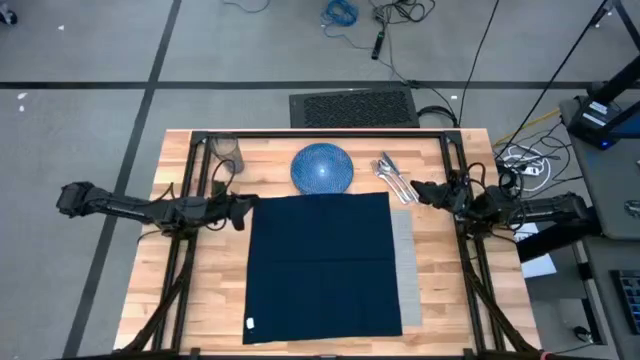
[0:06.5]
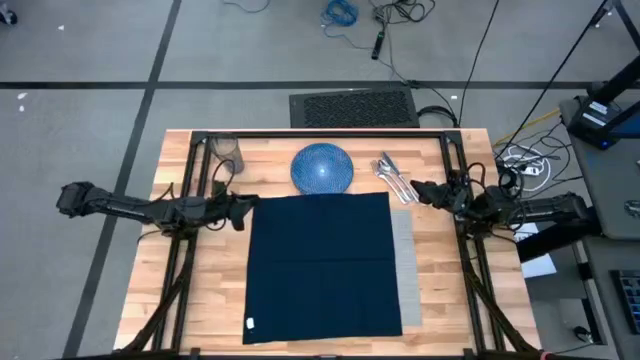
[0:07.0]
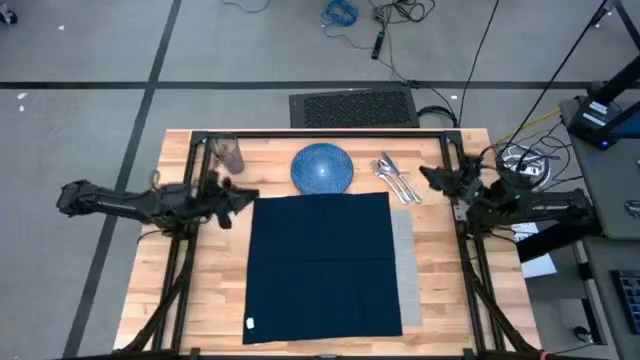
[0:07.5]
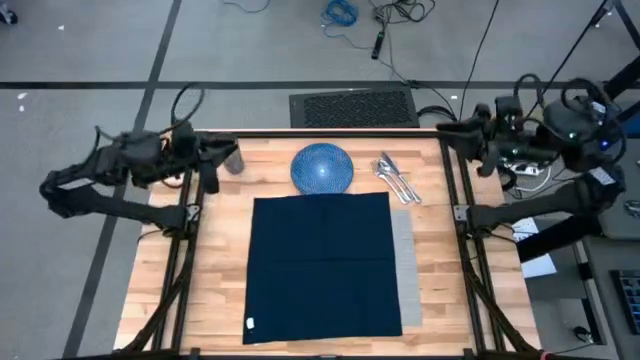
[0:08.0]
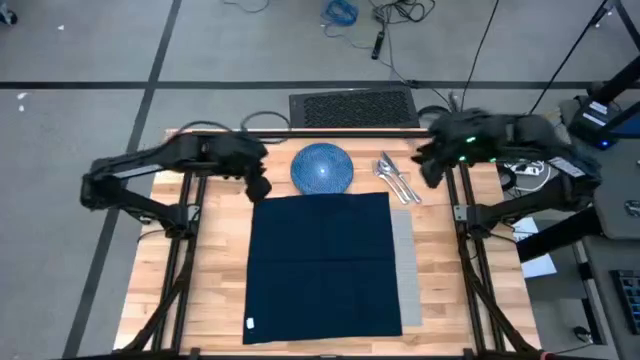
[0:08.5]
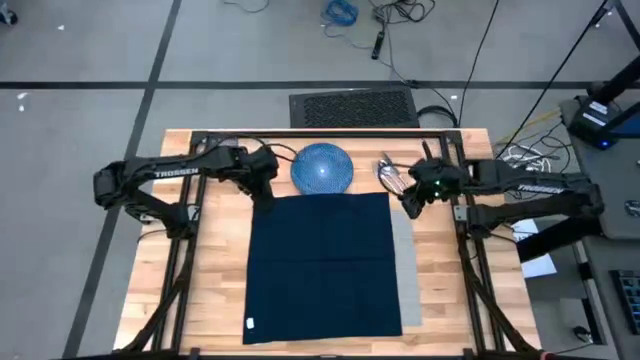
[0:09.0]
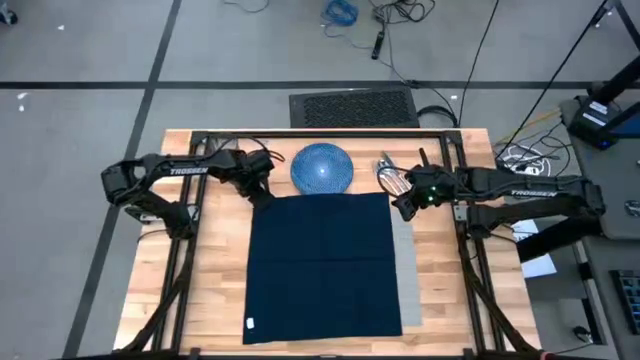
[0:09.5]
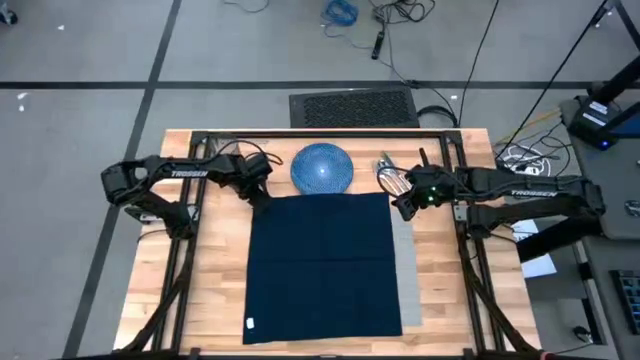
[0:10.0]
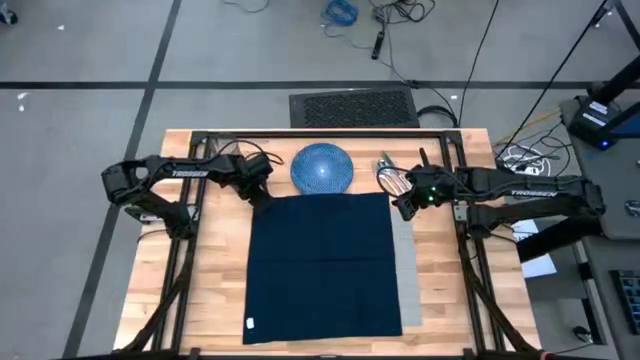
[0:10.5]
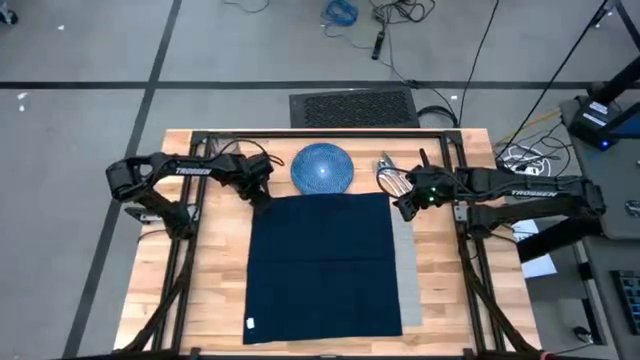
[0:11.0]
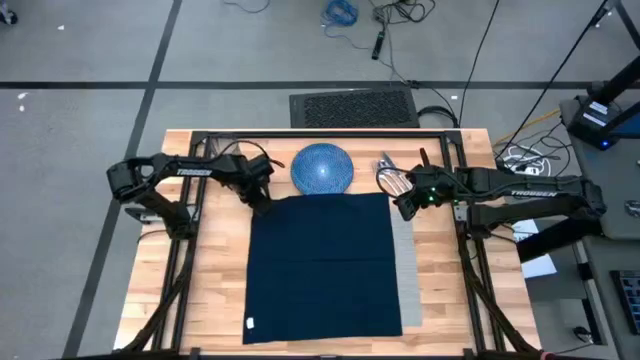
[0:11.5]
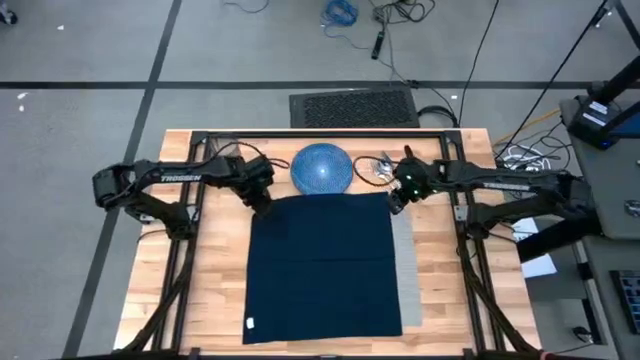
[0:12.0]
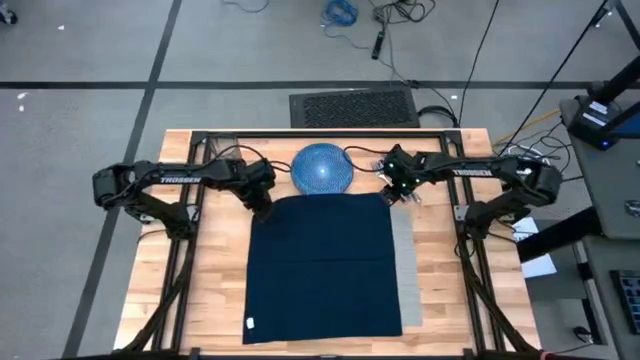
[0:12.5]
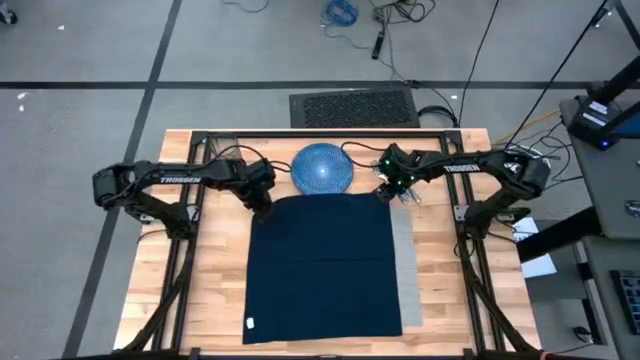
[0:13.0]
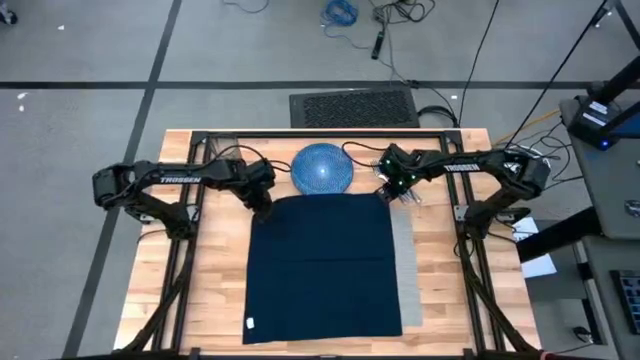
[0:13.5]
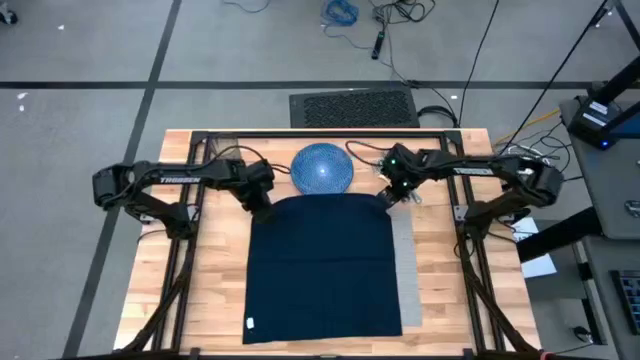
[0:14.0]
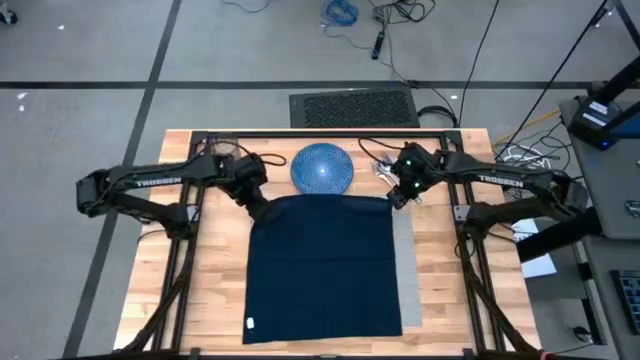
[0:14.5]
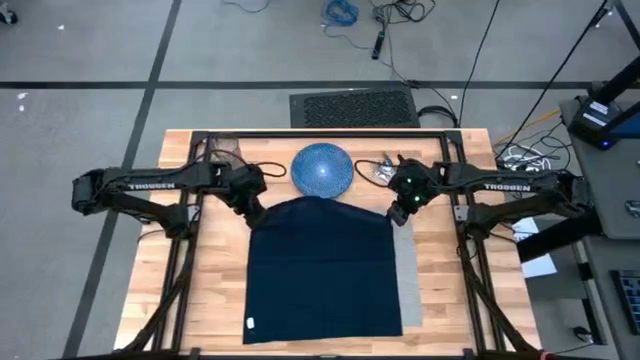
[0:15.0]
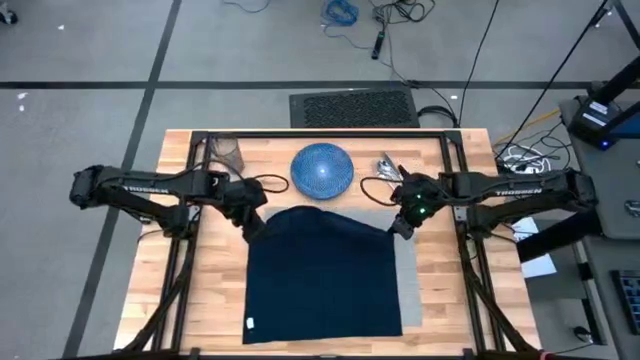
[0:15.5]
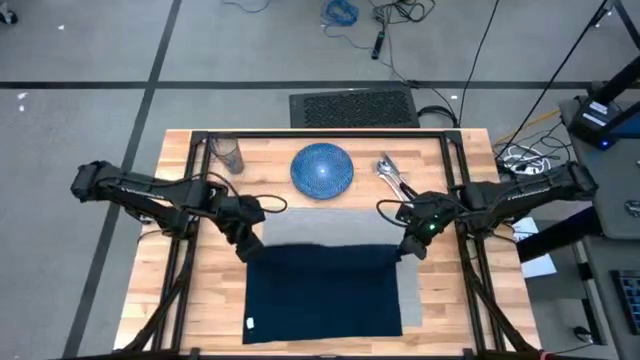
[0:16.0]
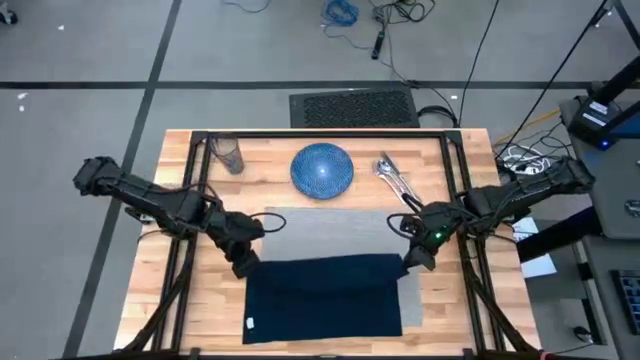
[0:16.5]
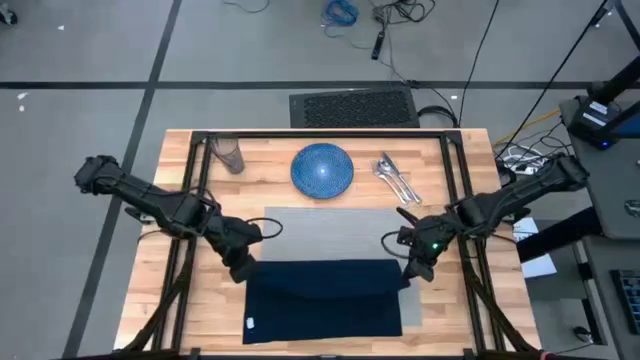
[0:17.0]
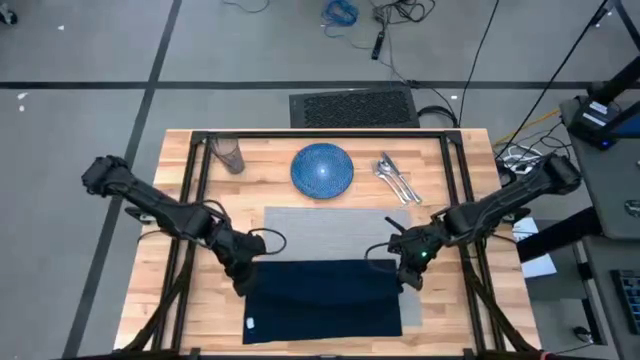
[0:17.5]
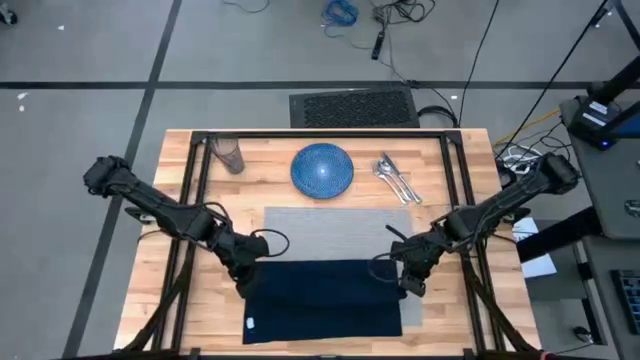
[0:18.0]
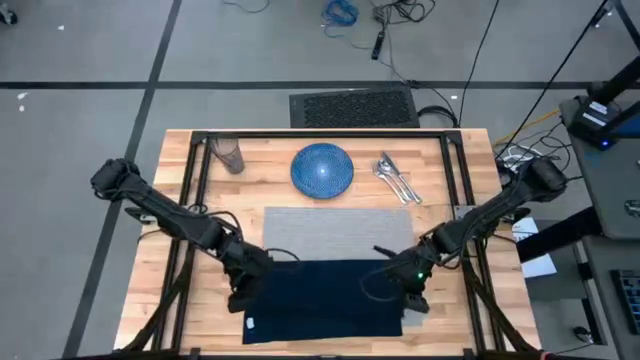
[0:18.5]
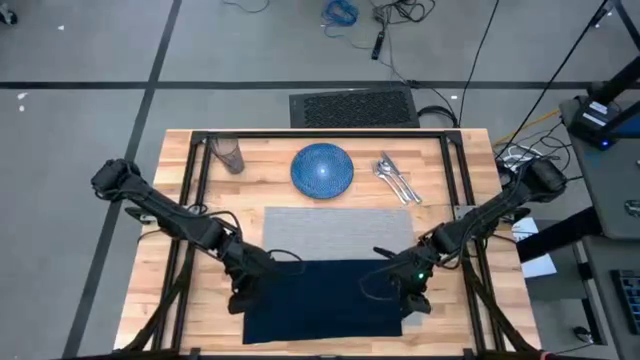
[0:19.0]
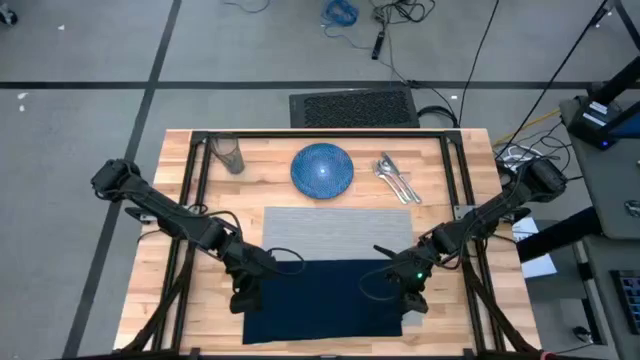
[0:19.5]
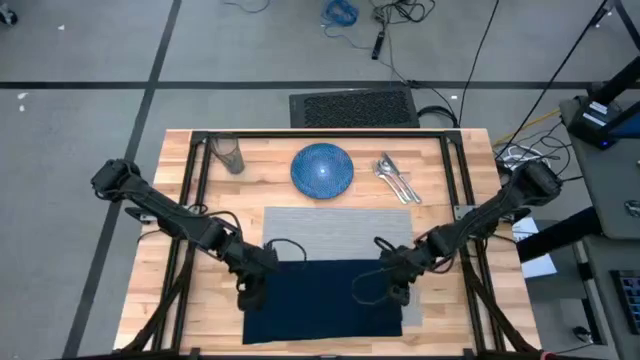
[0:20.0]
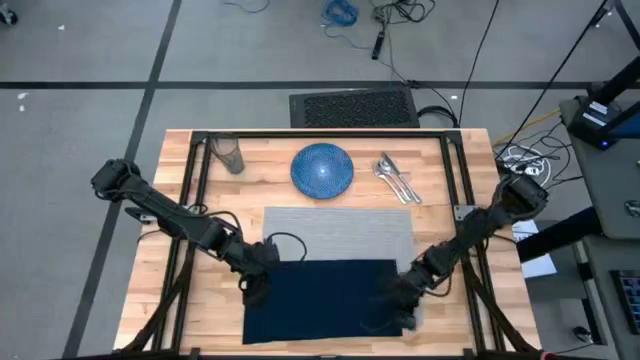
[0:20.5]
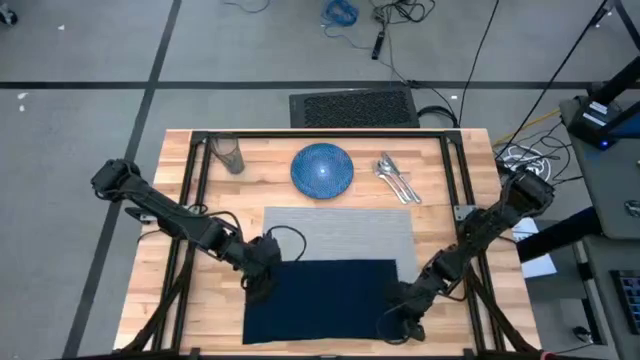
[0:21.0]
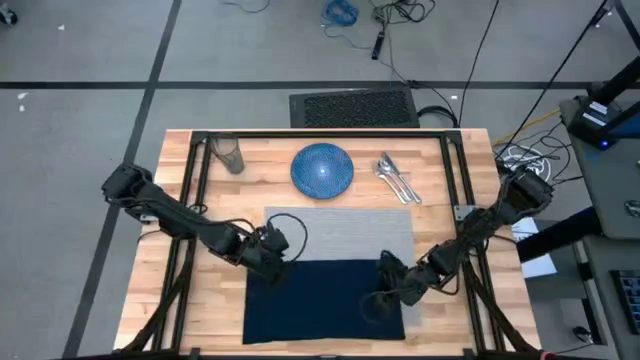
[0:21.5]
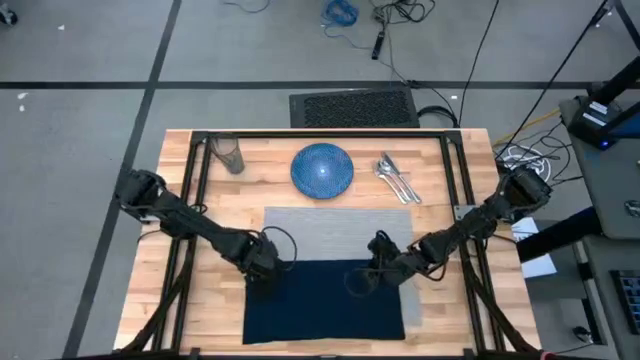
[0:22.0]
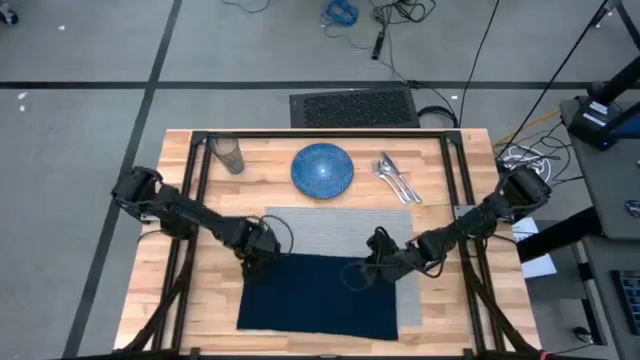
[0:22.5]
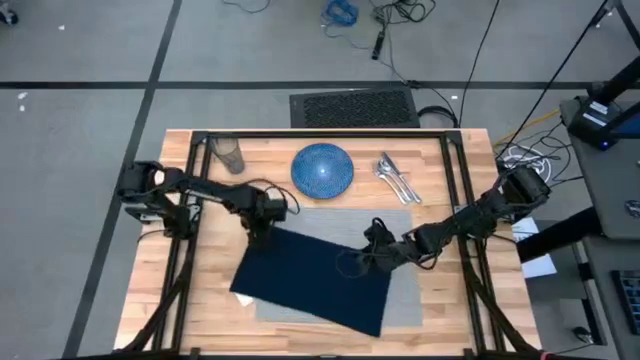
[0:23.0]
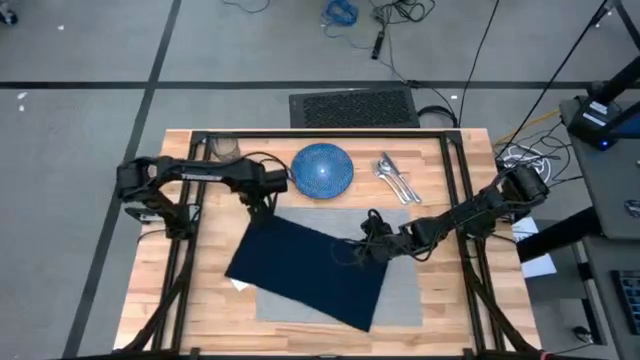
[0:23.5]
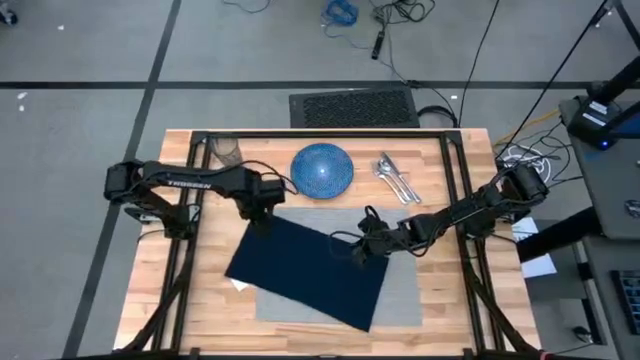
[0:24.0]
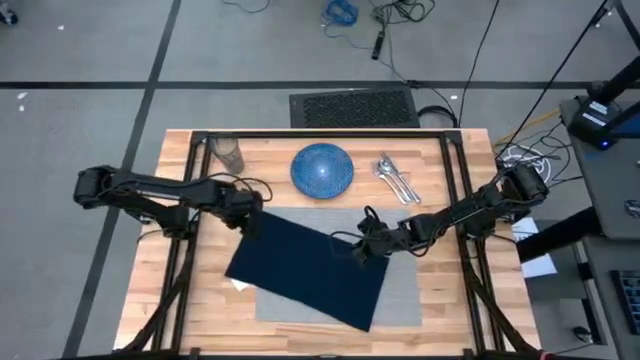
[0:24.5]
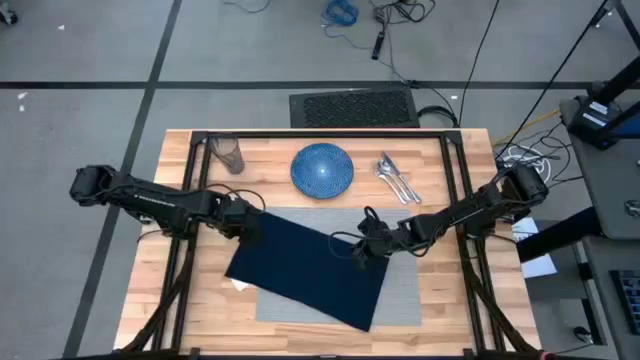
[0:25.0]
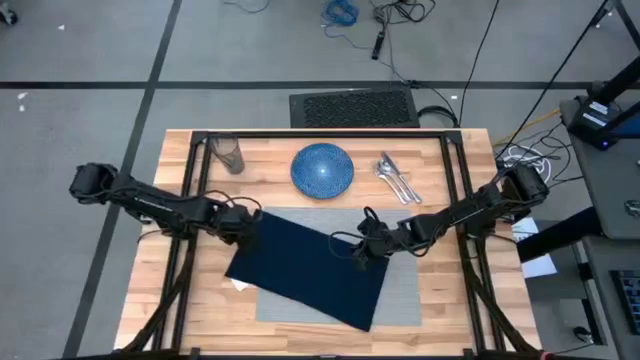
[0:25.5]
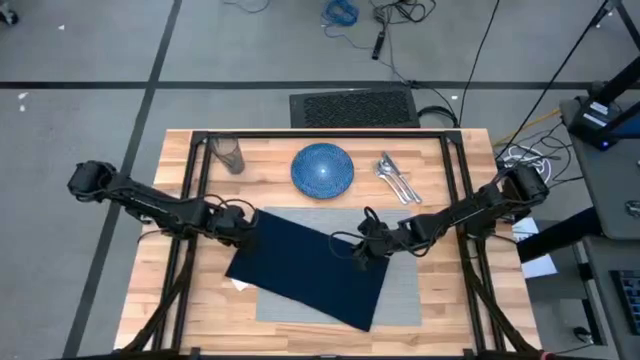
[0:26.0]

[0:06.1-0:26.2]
Task: Set table place
Fold the blue table napkin
